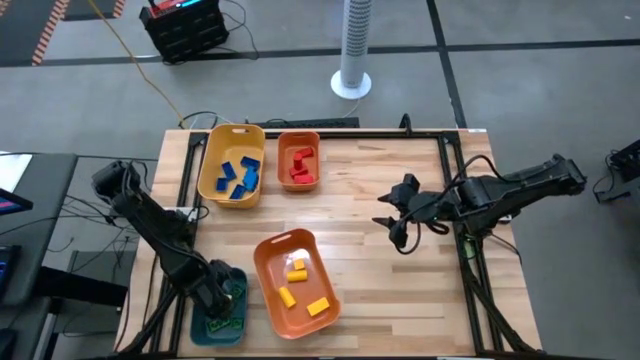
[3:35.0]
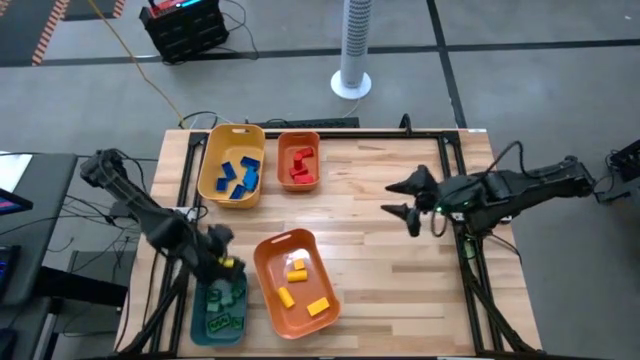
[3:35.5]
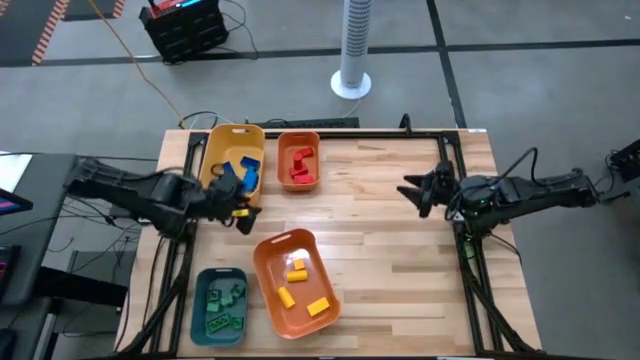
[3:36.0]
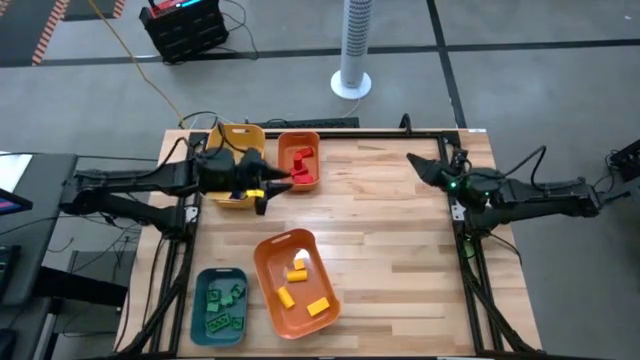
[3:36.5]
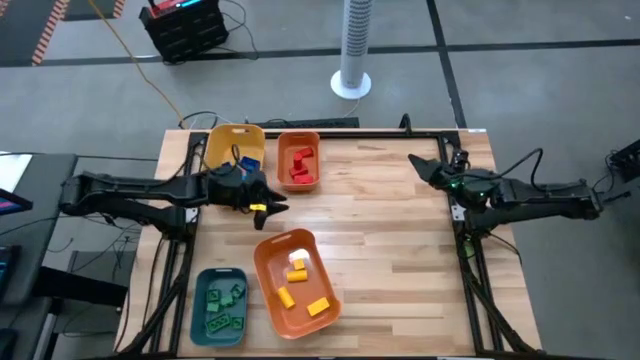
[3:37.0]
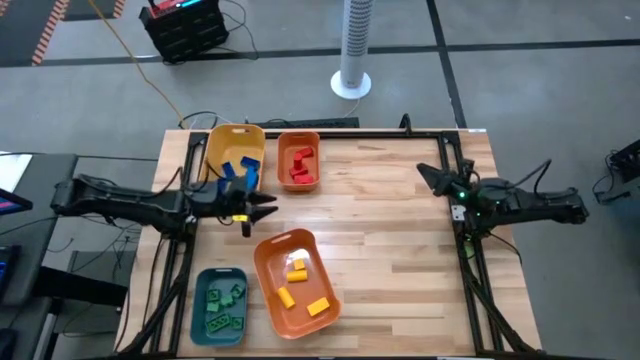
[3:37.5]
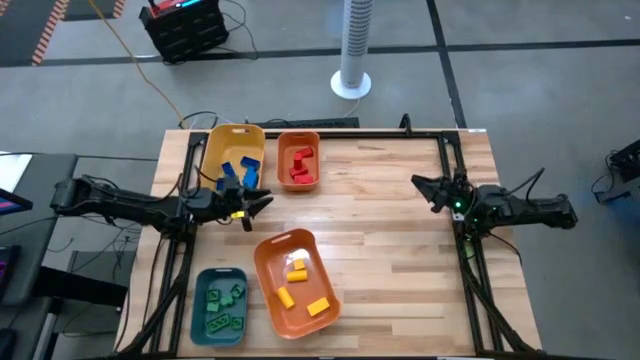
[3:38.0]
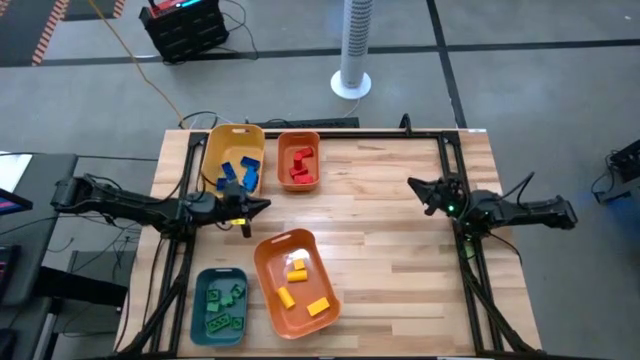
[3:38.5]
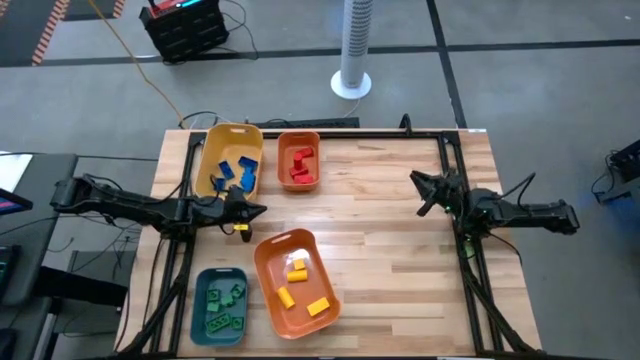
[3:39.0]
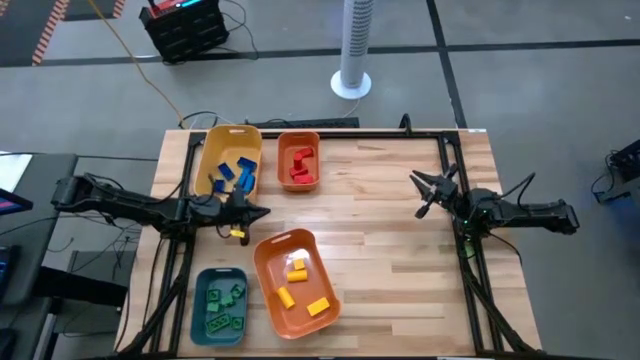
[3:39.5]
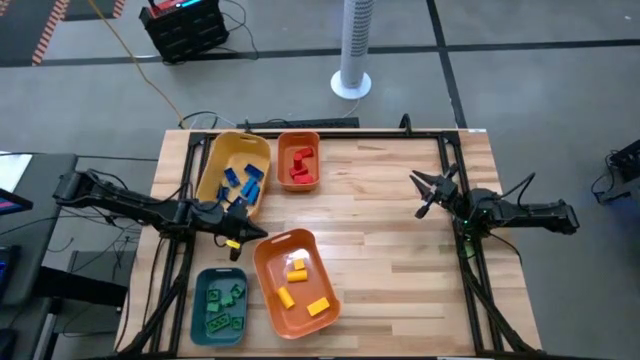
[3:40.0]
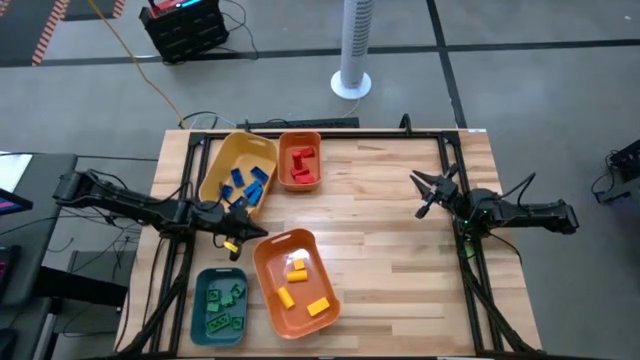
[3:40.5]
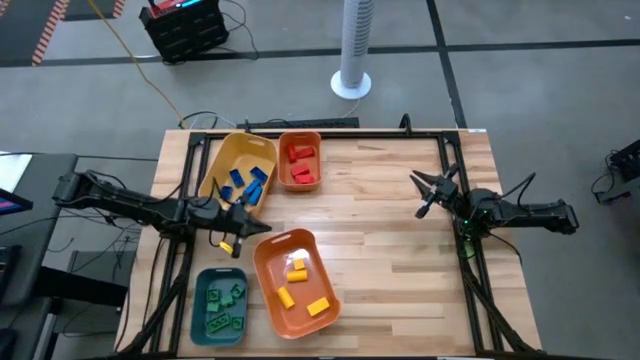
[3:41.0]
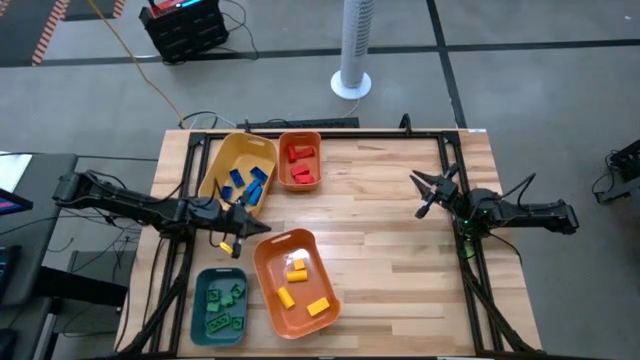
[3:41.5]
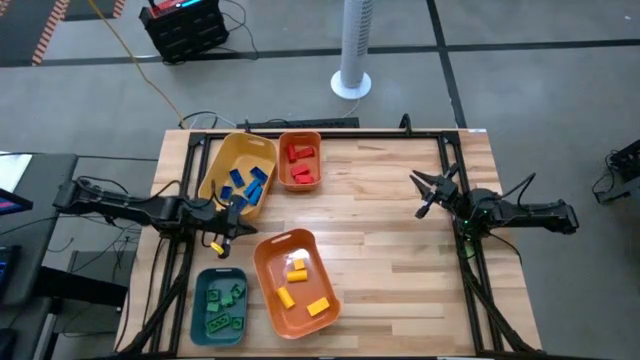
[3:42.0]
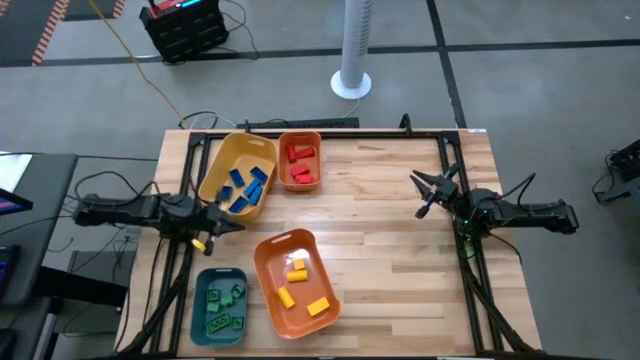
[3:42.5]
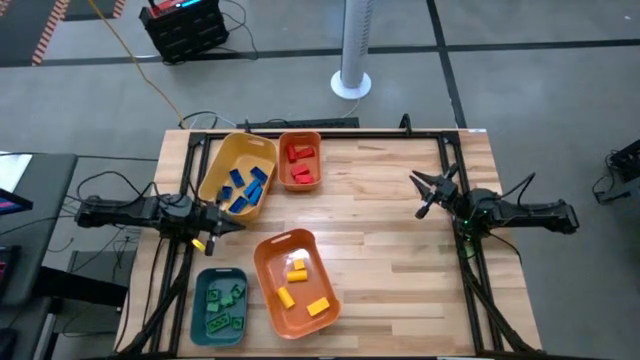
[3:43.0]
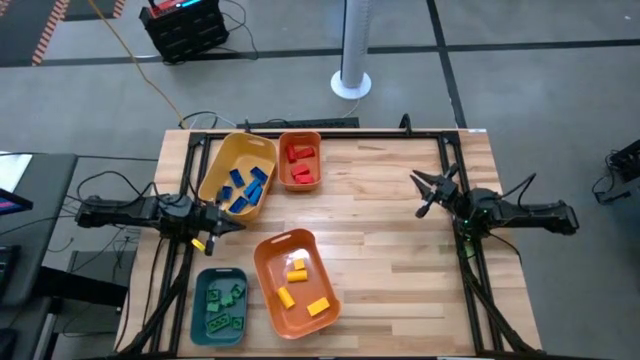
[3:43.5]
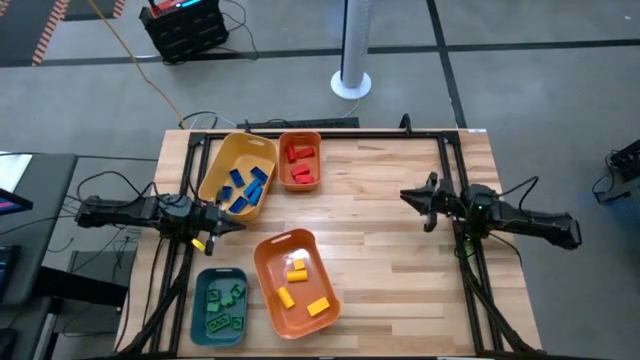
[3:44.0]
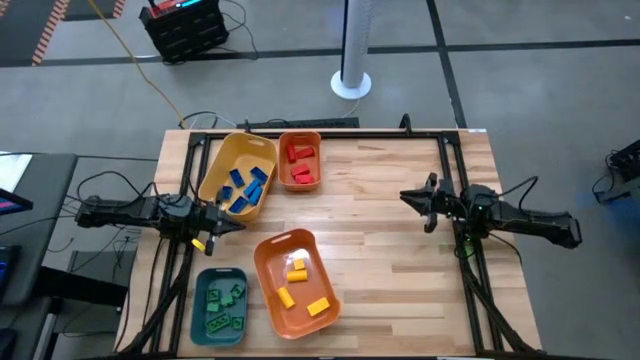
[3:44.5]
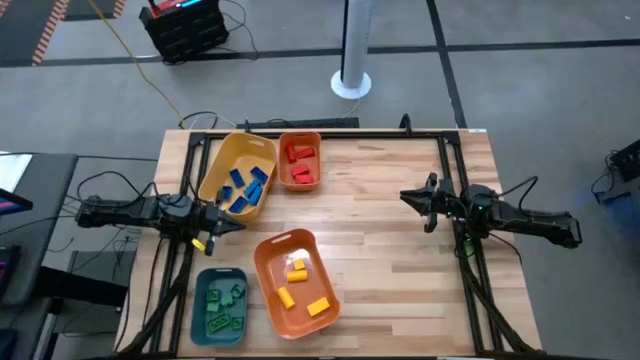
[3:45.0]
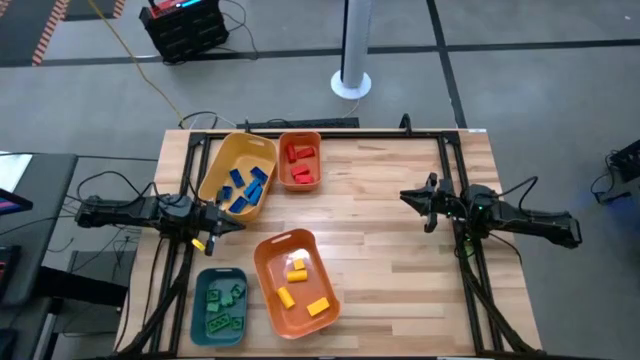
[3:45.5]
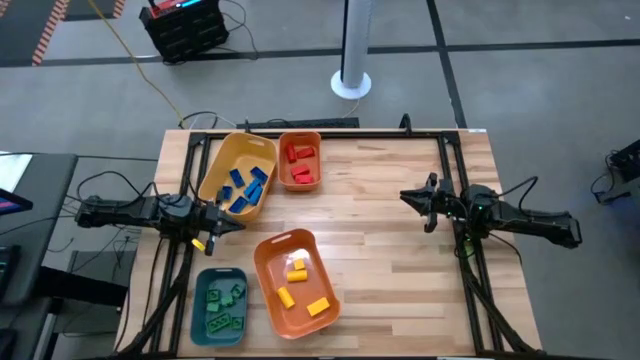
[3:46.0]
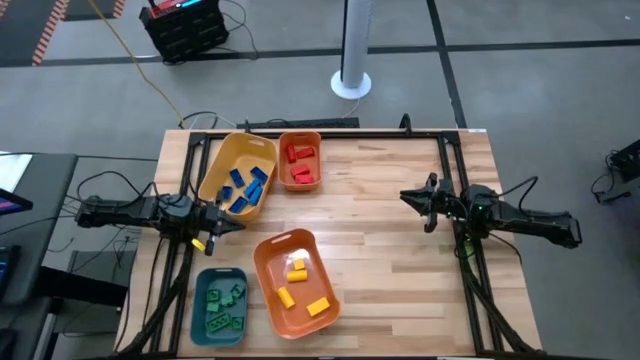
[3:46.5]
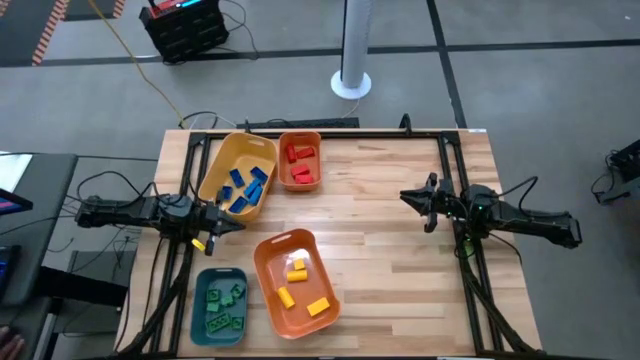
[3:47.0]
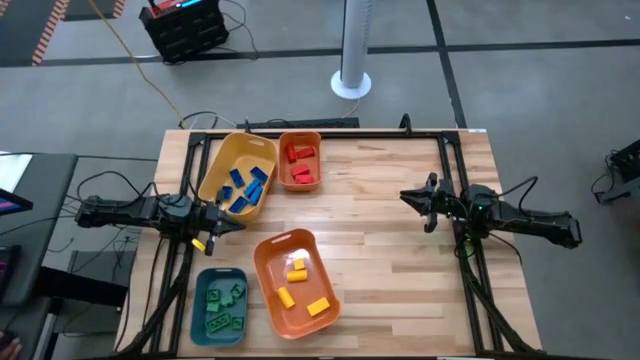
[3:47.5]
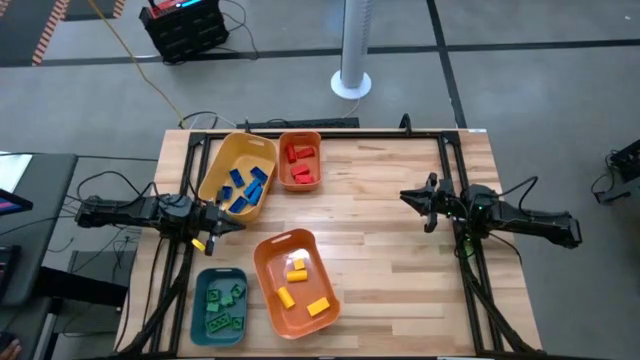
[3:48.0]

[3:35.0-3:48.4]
Task: Sort blocks
Return to Home Position

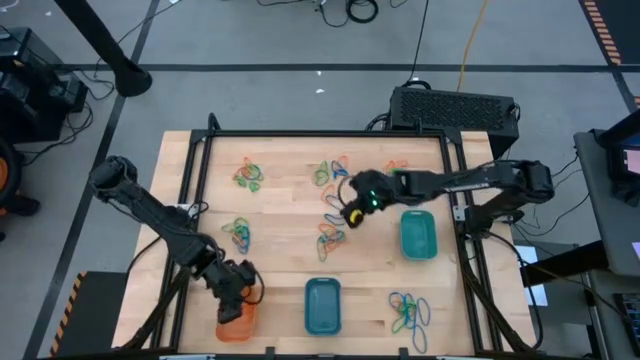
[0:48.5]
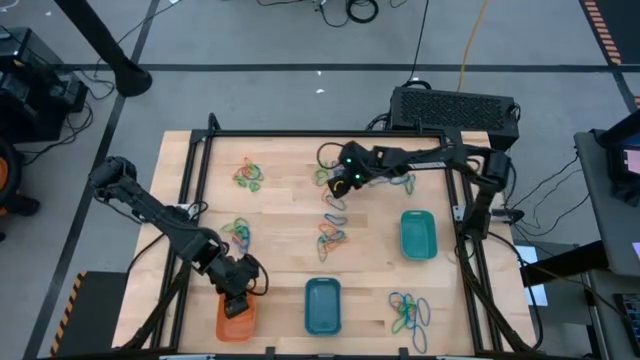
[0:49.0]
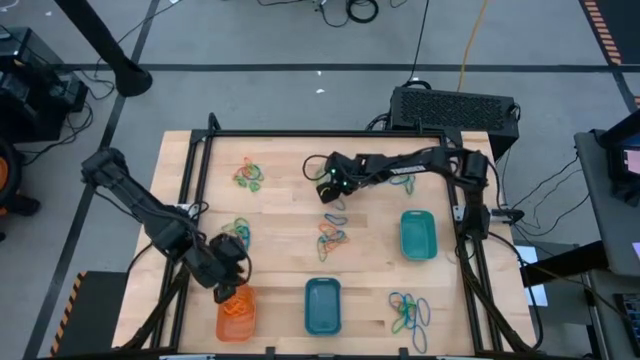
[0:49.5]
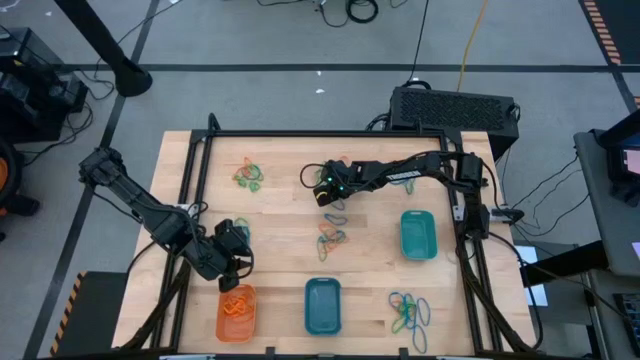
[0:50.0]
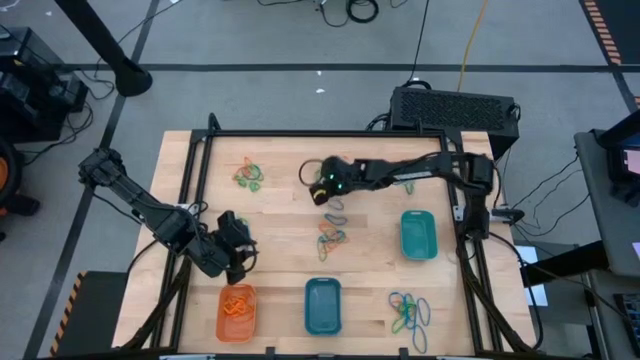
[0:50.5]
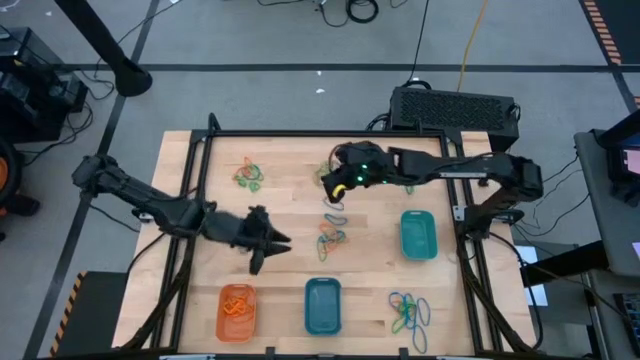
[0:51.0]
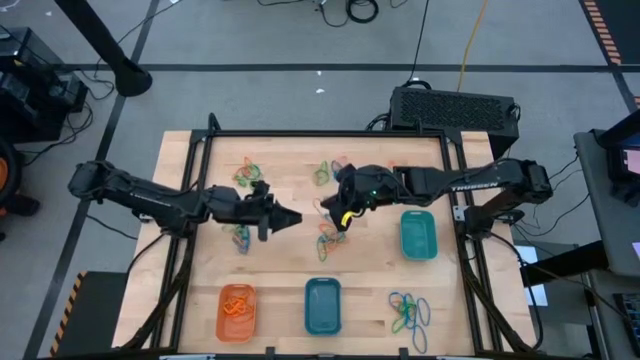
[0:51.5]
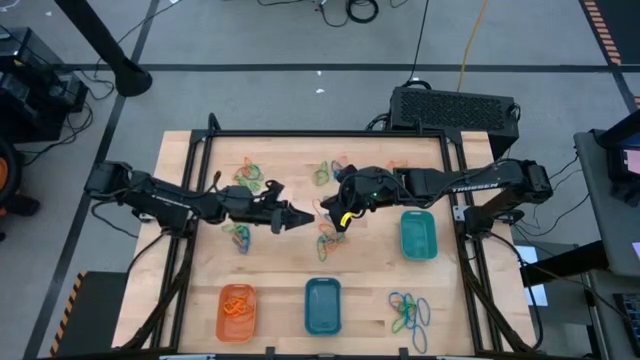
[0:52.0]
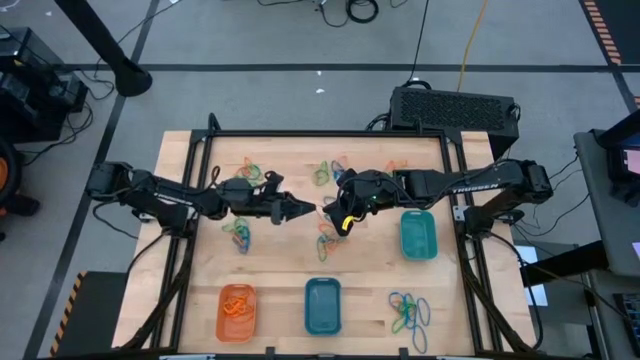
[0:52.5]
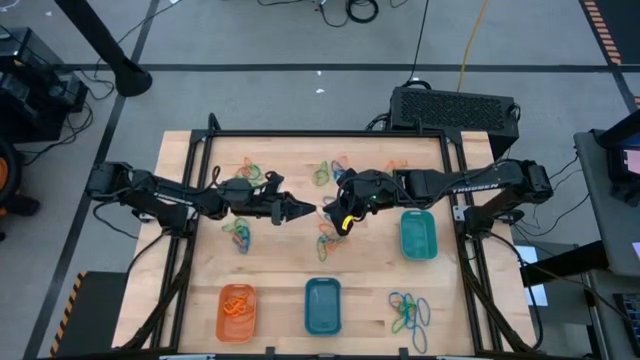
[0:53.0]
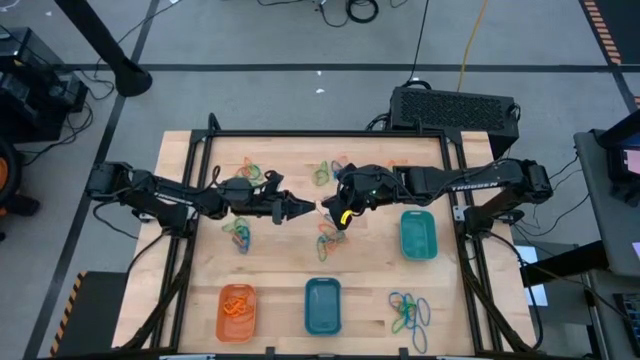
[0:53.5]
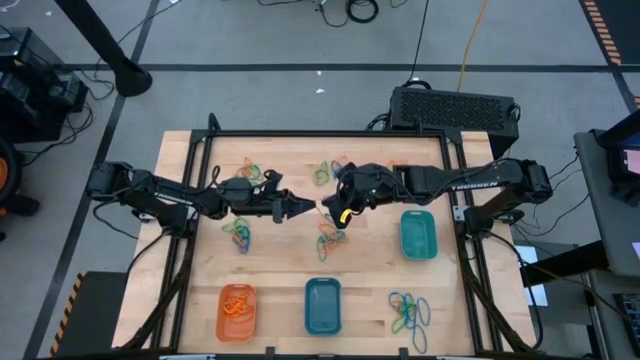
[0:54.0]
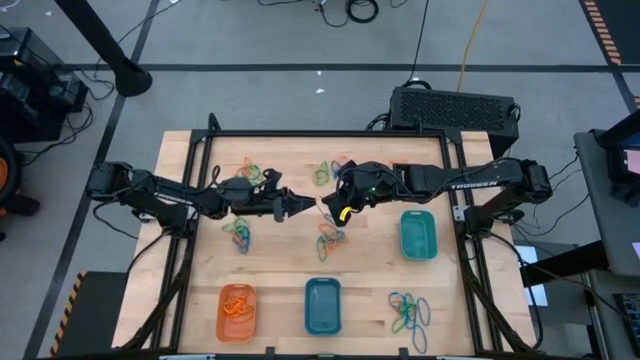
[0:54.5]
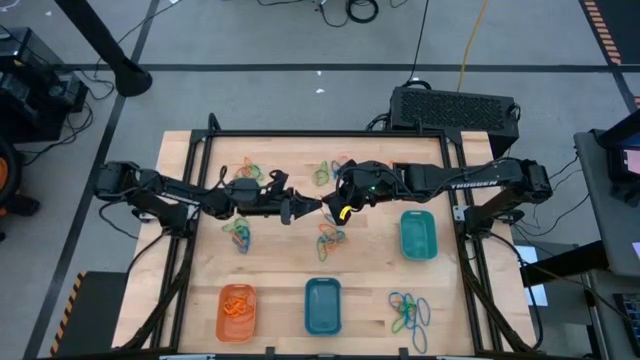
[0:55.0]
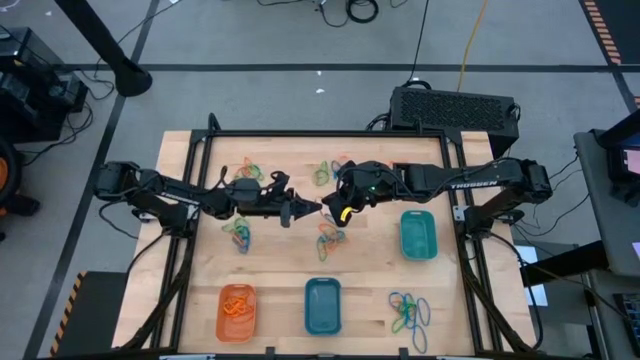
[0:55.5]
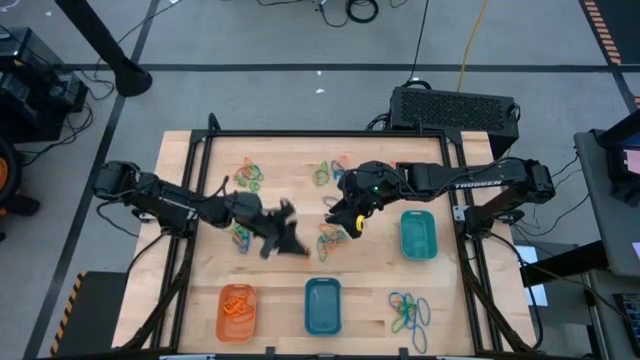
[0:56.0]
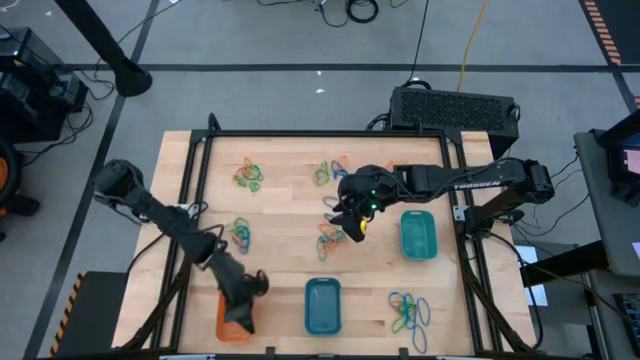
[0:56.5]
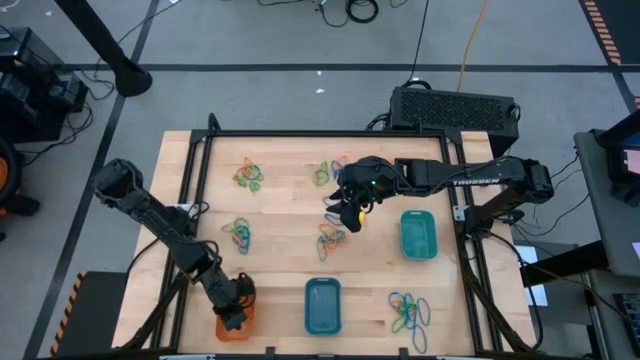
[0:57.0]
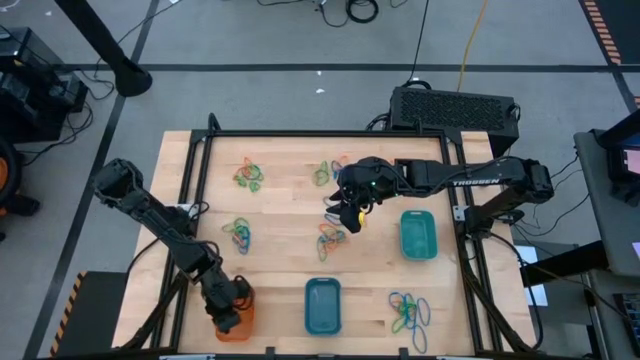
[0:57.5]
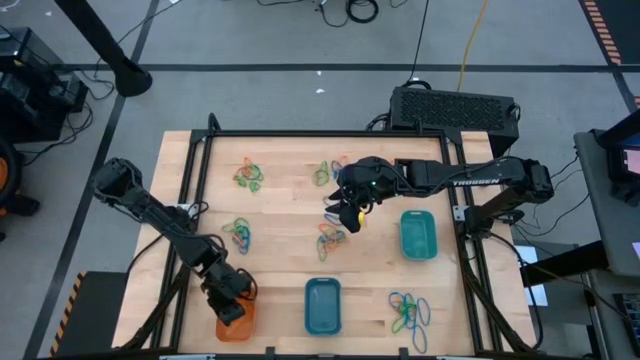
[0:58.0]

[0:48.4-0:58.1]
Task: Sort rubber bands into baskets
Put the orange rubber band into the orange bin
